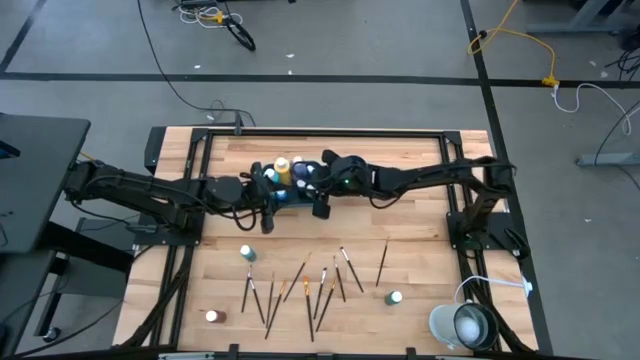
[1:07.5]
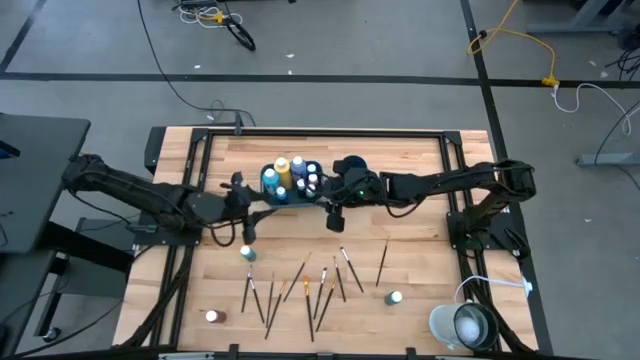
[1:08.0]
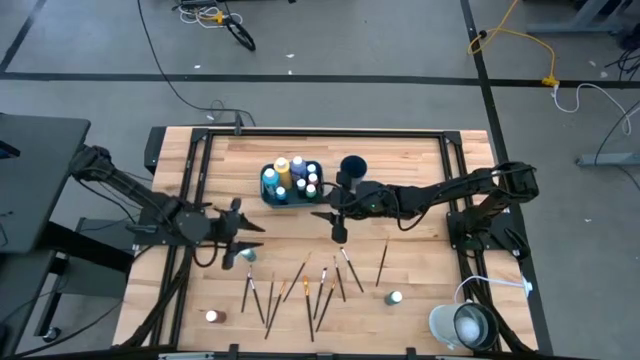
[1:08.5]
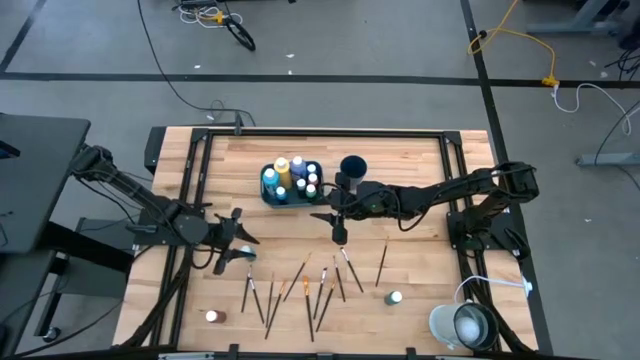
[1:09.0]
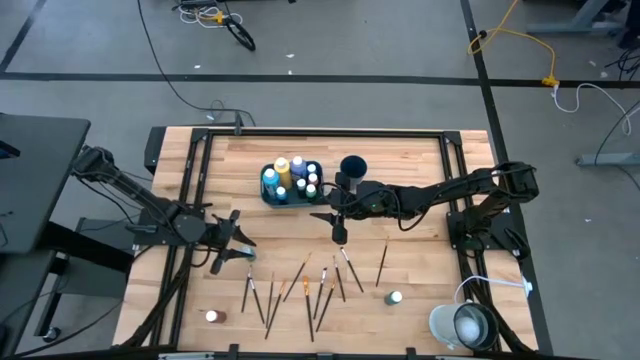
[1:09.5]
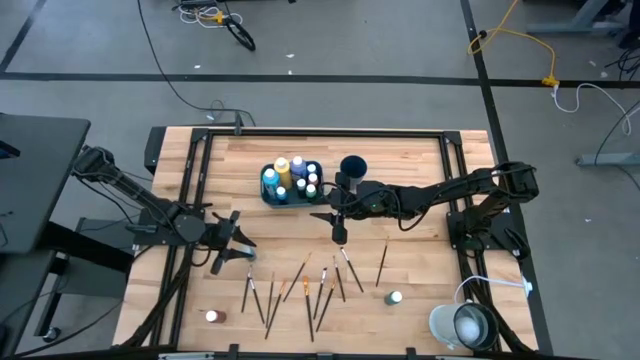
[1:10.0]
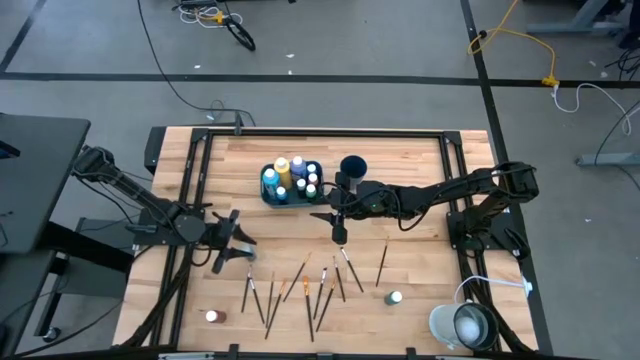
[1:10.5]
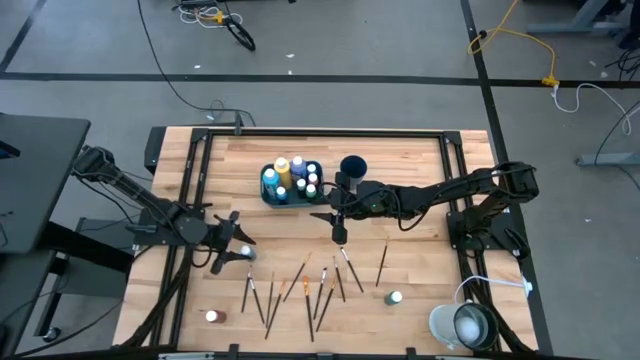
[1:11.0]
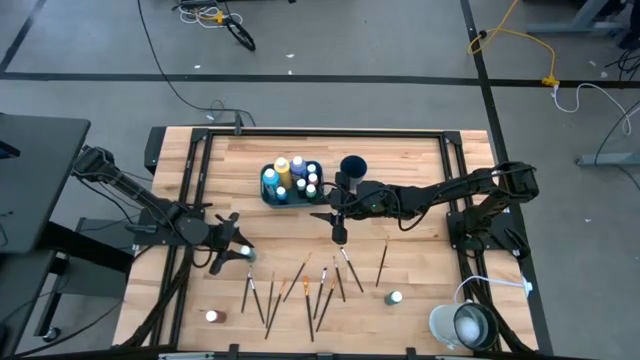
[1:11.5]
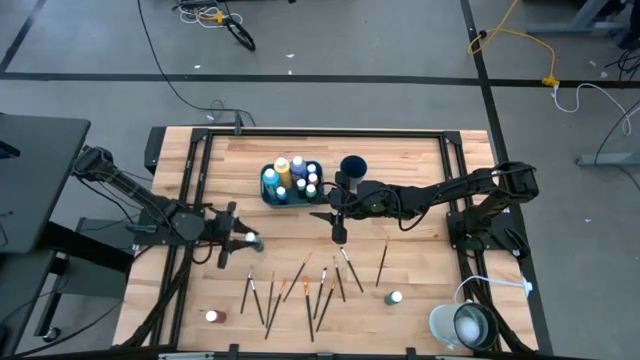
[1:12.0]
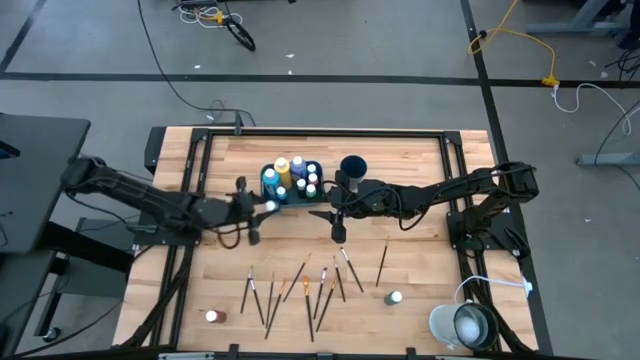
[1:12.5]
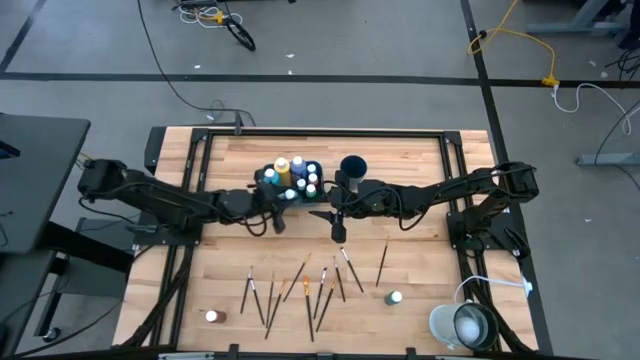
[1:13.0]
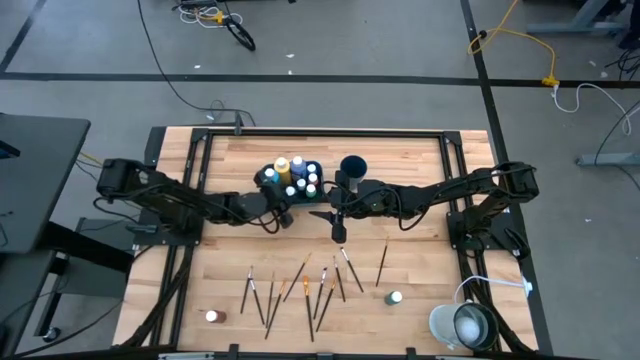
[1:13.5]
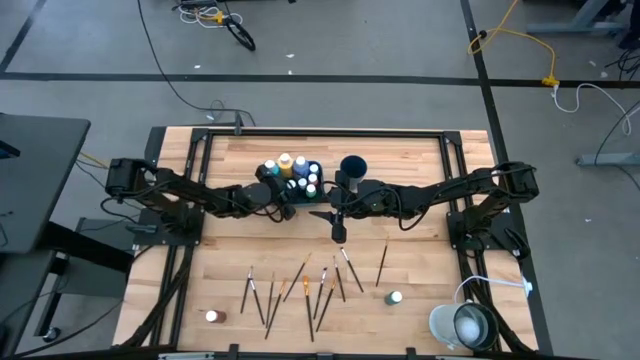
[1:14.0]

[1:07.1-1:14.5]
Task: Pick & Place Paint Supplies
Put the small light blue paint bottle into the blue bin

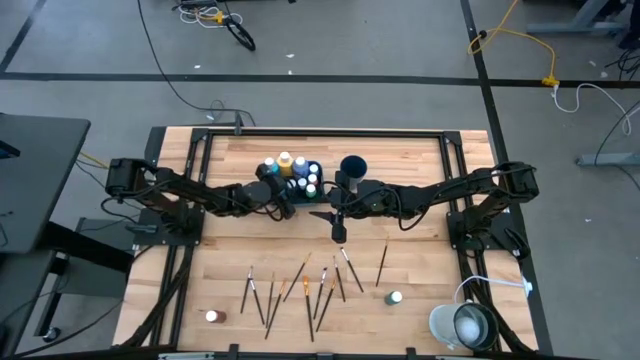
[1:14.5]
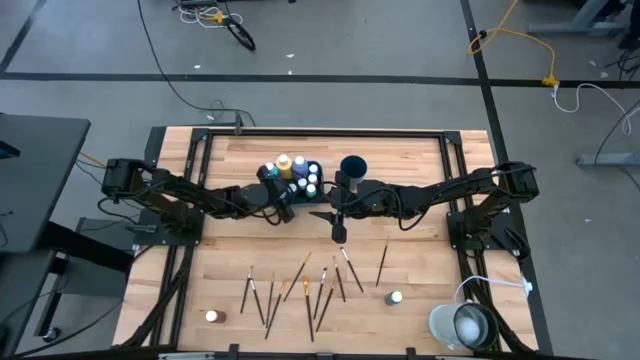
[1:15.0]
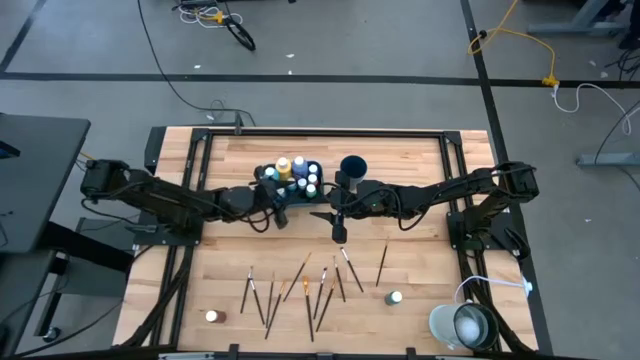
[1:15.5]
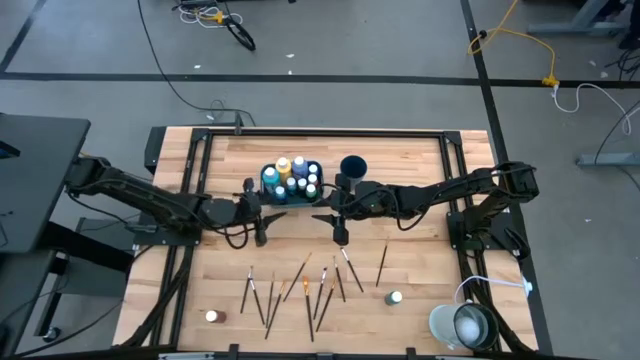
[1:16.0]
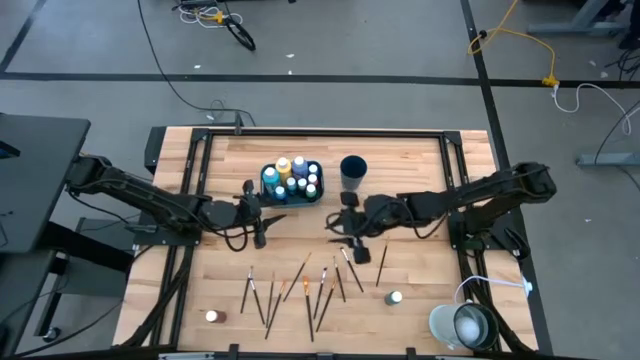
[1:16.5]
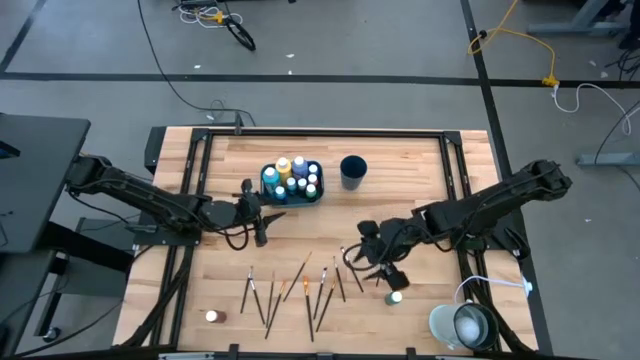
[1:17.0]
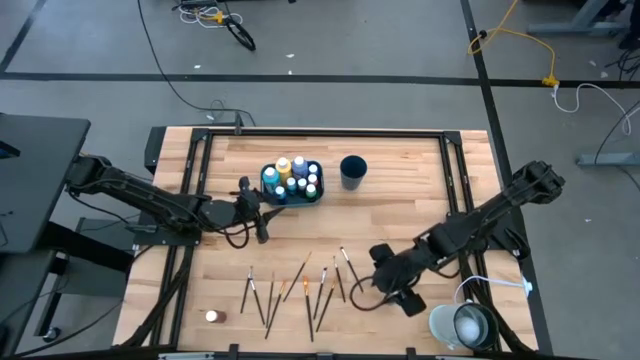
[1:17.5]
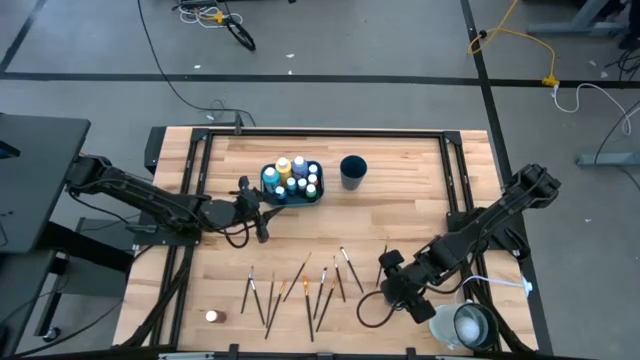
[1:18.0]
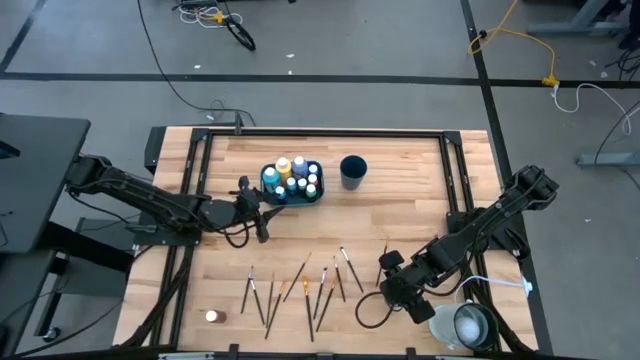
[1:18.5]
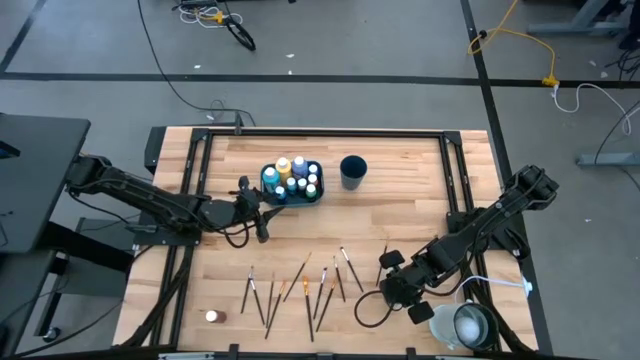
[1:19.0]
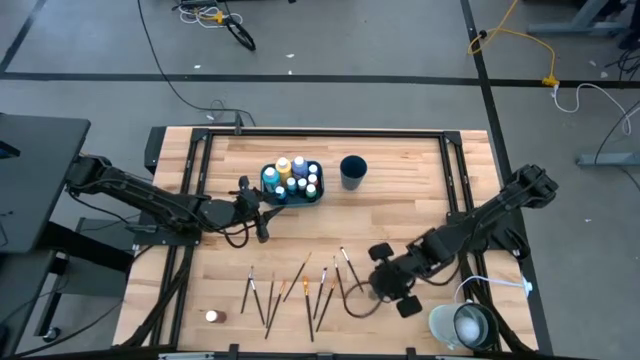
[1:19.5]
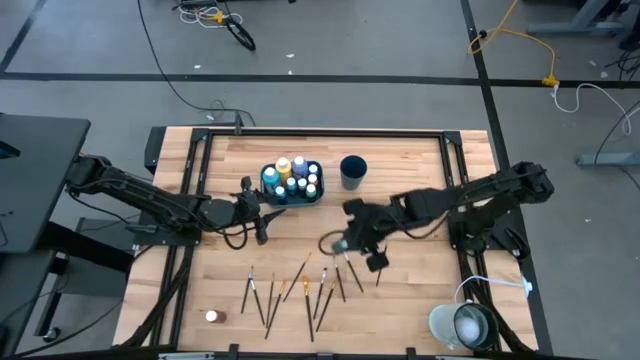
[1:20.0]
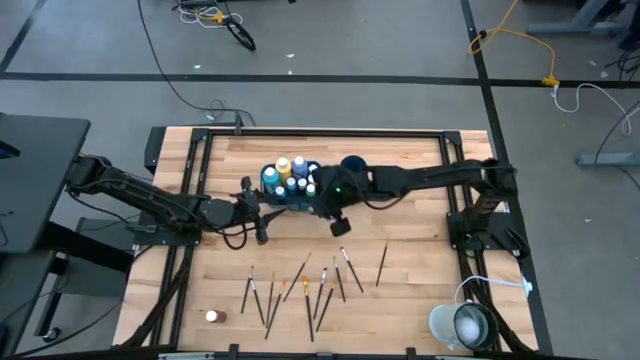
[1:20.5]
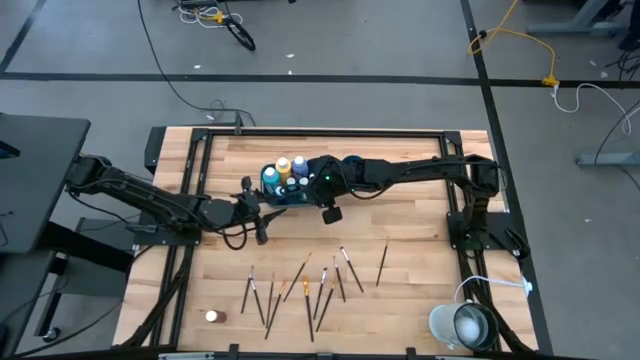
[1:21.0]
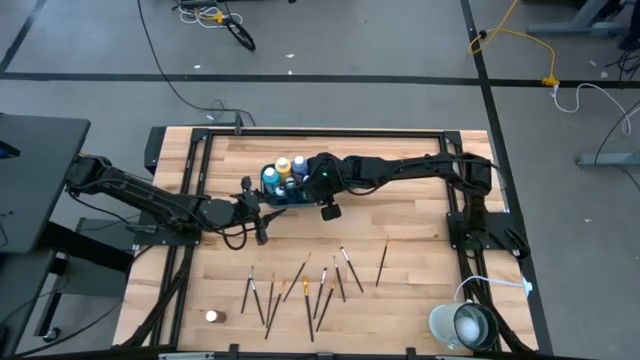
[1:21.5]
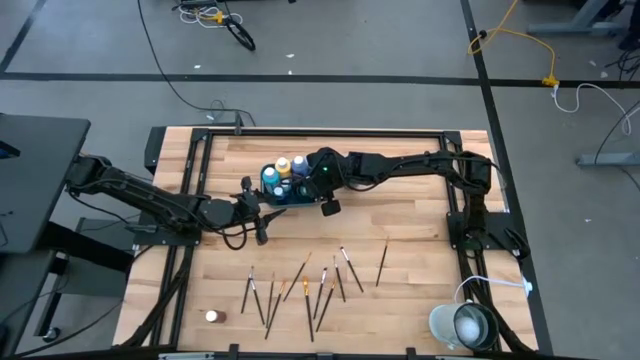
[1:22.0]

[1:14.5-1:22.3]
Put the small light blue paint bottle into the blue bin

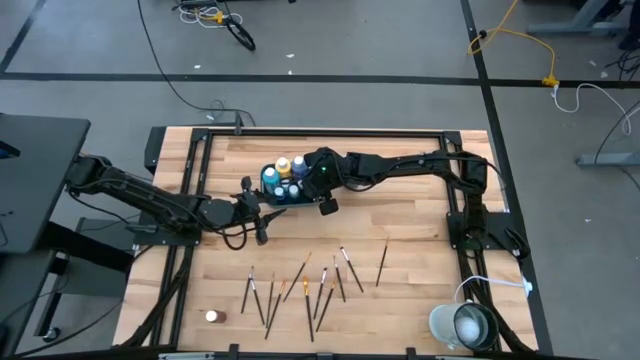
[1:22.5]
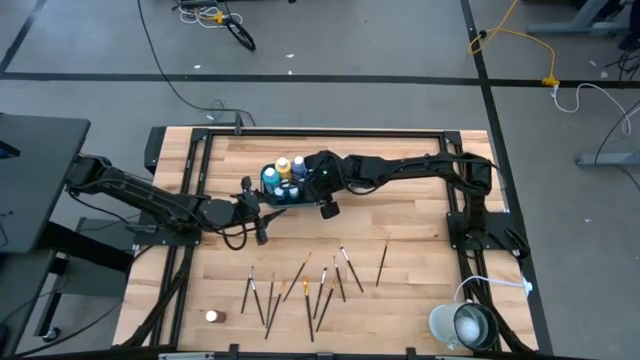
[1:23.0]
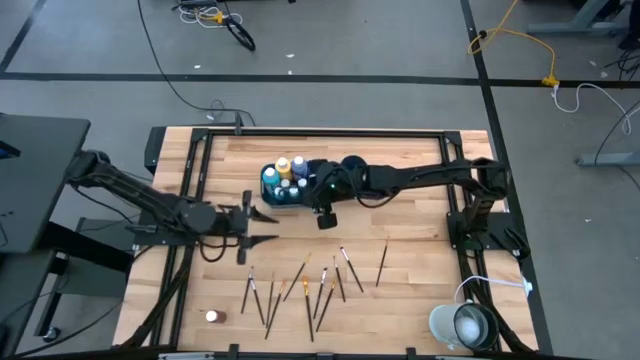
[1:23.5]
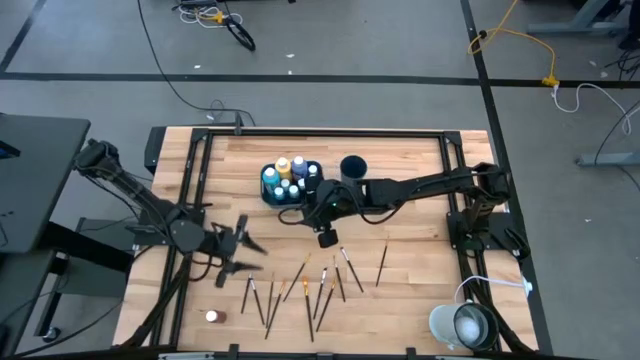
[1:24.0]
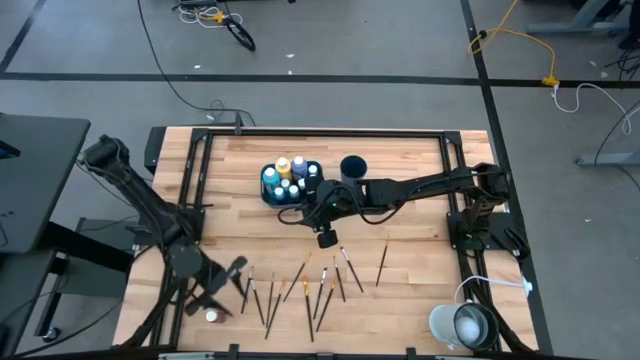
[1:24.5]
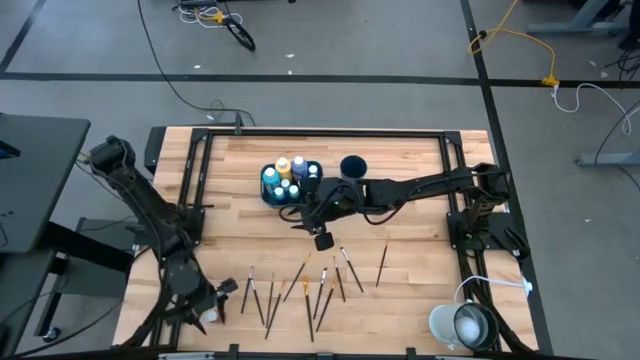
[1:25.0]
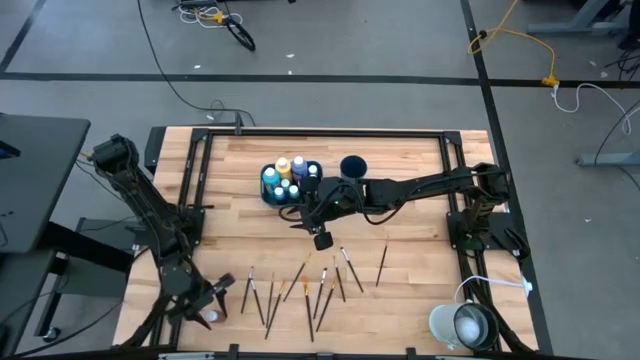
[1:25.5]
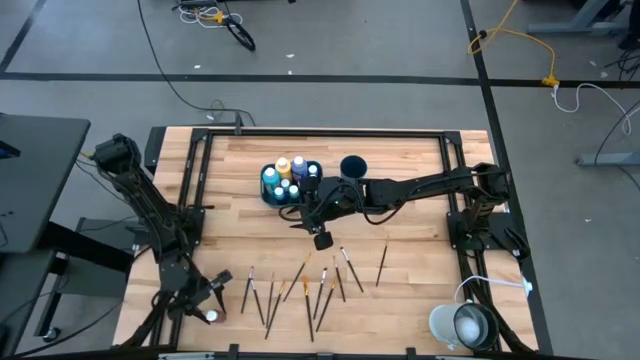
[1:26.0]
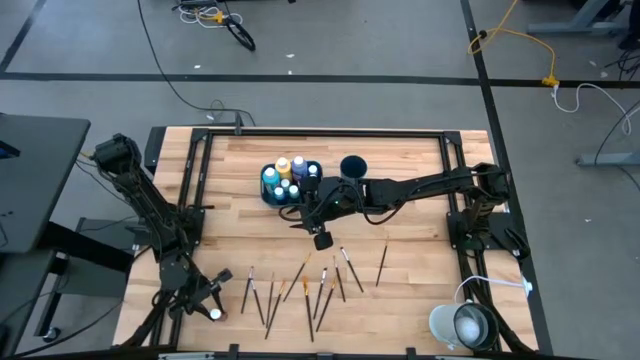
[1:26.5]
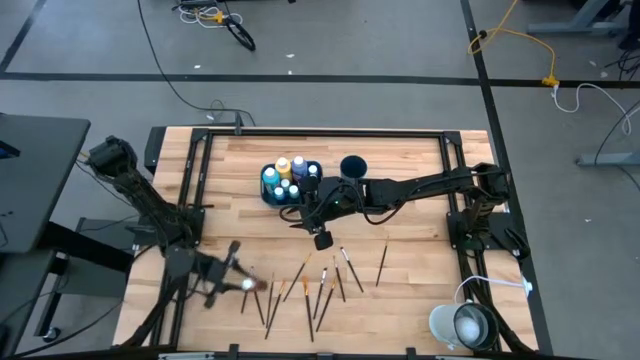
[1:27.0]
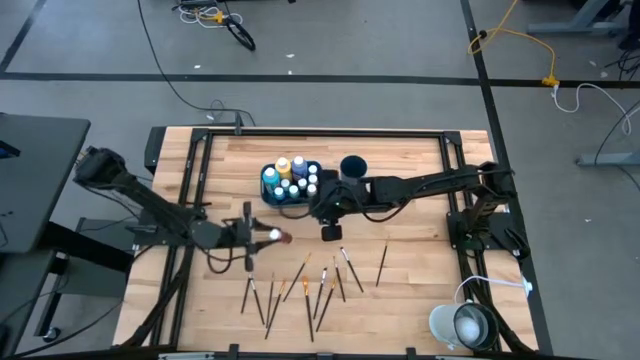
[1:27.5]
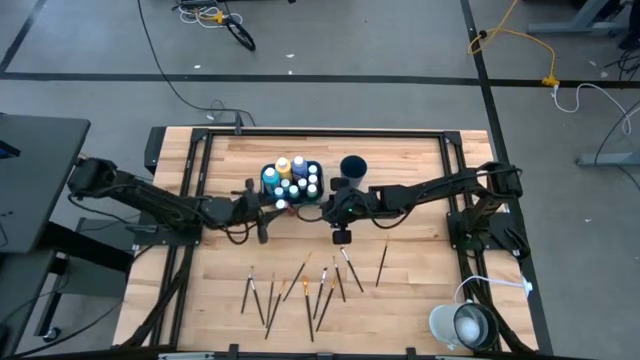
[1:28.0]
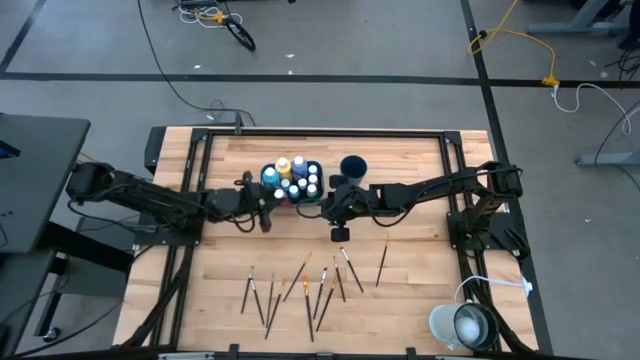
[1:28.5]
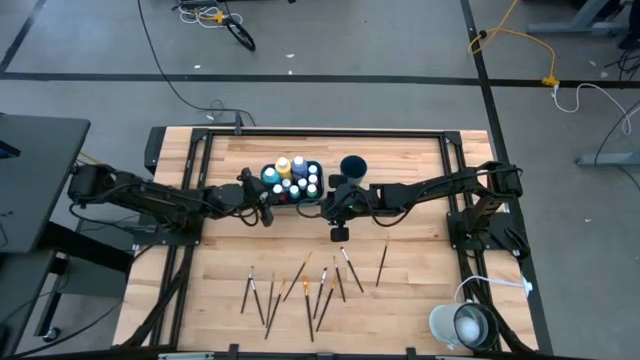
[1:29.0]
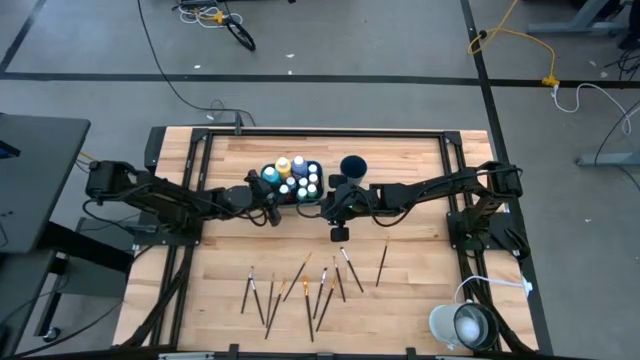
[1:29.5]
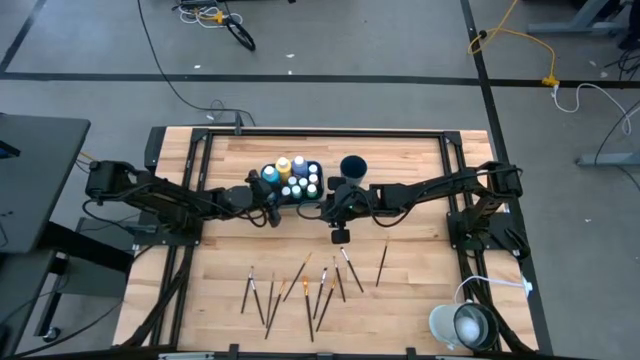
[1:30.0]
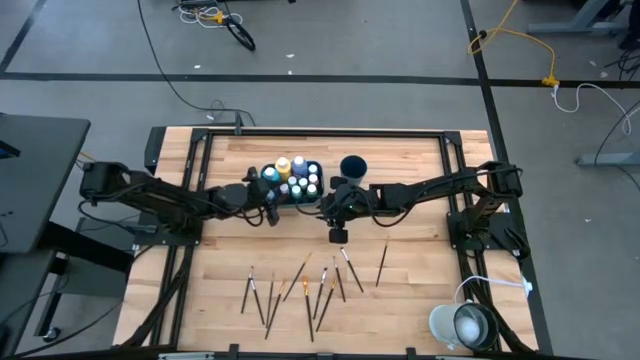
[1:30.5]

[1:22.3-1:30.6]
Put the red paint bottle into the blue bin
